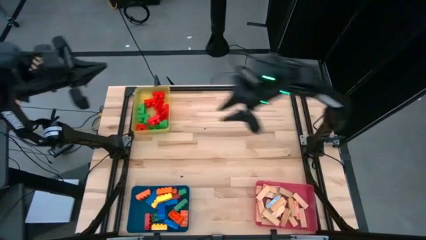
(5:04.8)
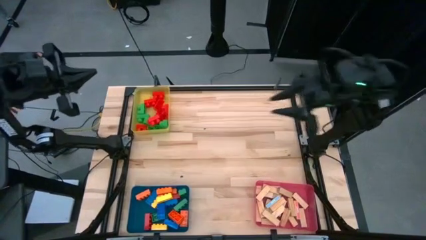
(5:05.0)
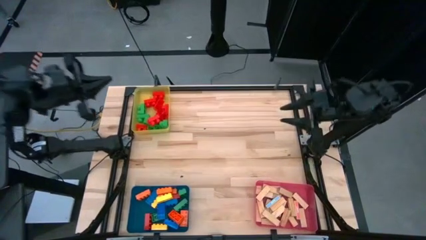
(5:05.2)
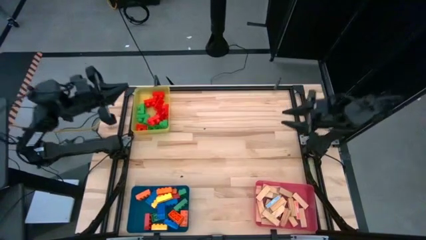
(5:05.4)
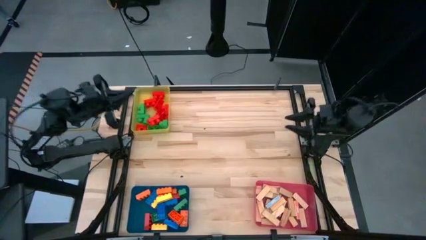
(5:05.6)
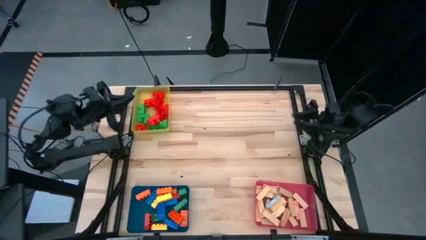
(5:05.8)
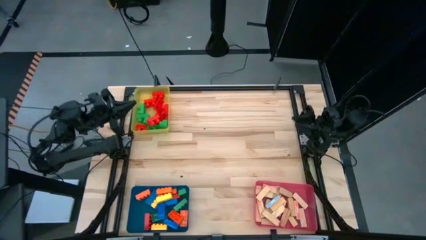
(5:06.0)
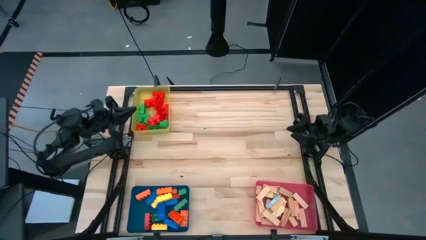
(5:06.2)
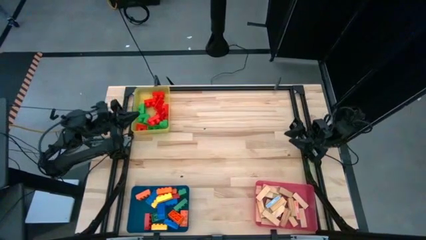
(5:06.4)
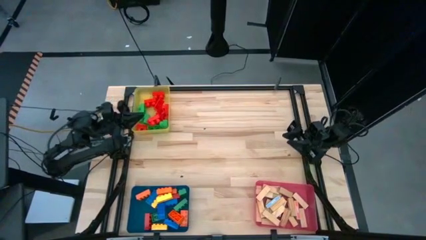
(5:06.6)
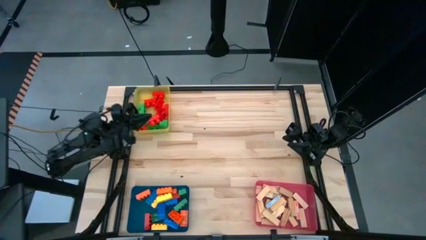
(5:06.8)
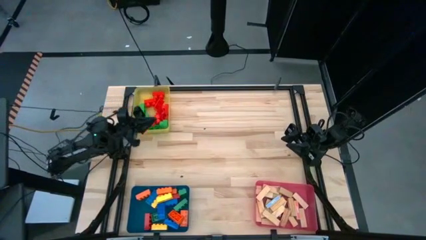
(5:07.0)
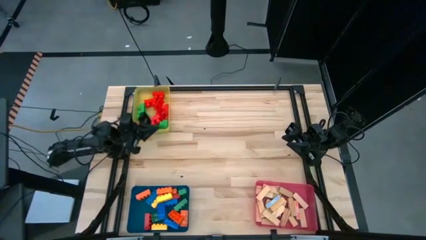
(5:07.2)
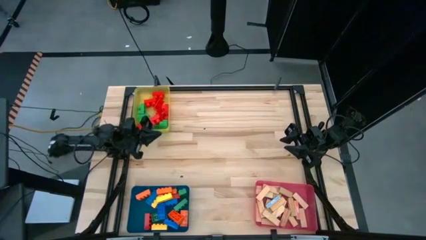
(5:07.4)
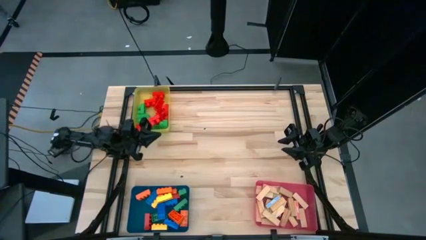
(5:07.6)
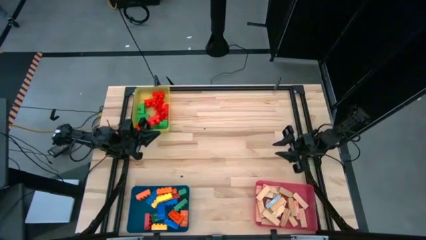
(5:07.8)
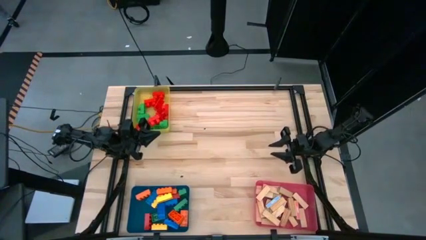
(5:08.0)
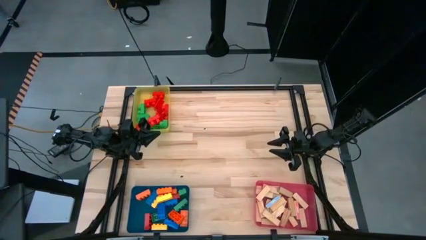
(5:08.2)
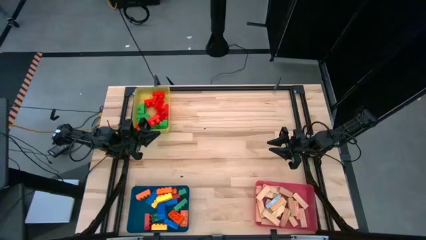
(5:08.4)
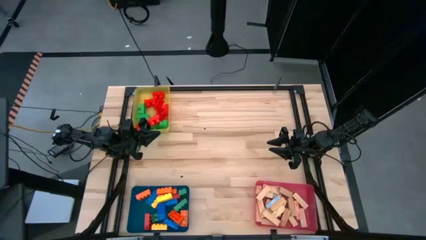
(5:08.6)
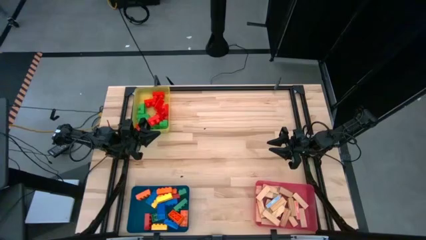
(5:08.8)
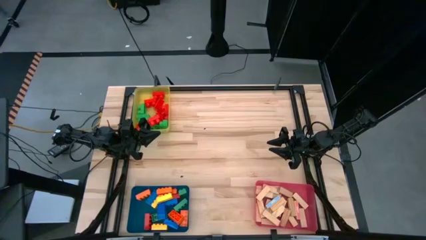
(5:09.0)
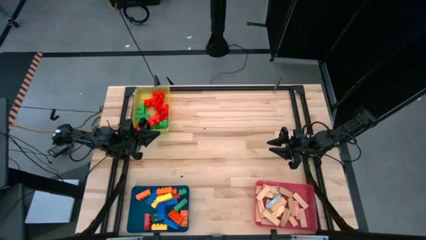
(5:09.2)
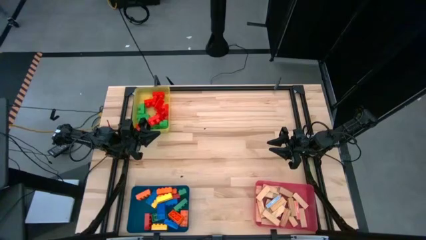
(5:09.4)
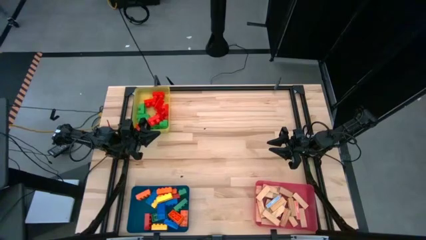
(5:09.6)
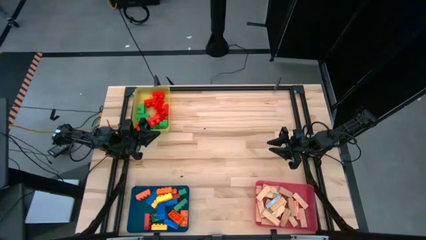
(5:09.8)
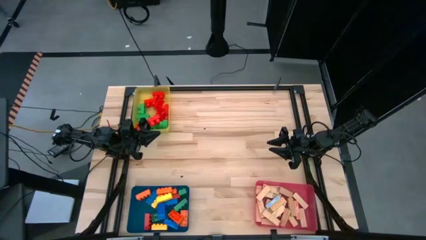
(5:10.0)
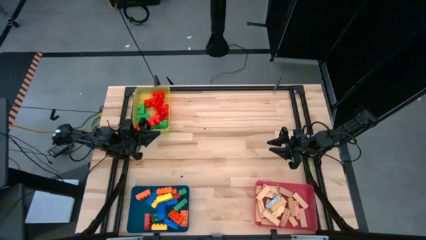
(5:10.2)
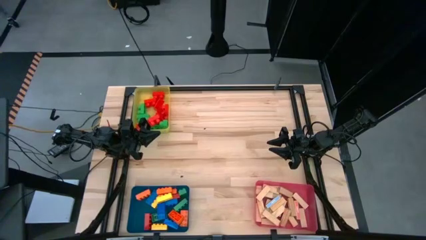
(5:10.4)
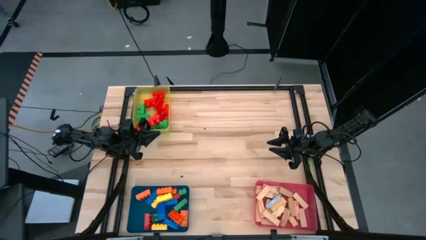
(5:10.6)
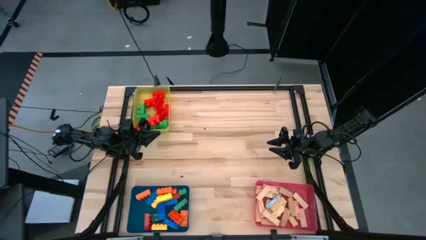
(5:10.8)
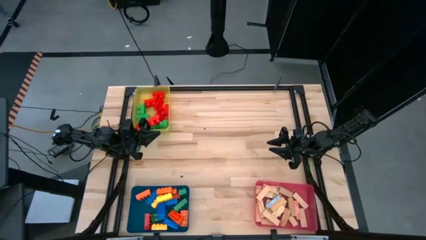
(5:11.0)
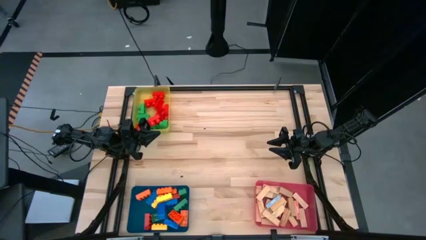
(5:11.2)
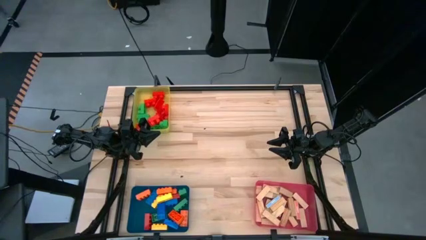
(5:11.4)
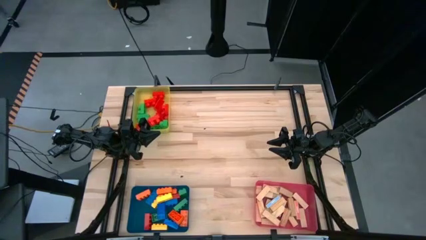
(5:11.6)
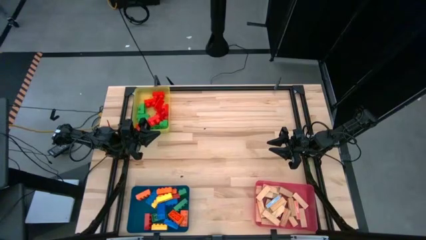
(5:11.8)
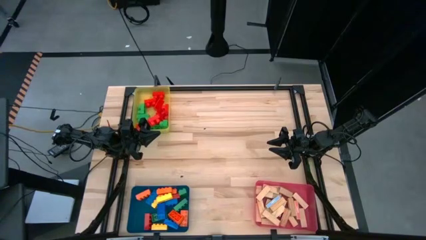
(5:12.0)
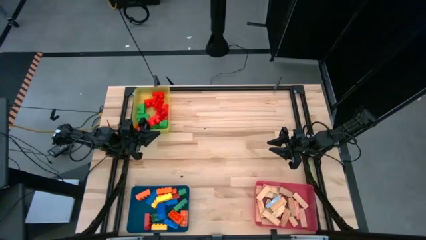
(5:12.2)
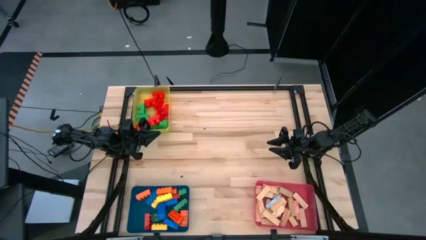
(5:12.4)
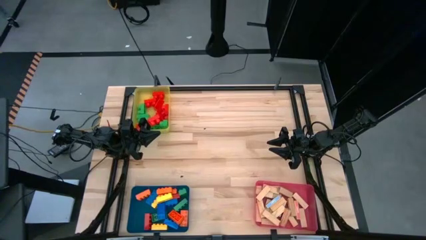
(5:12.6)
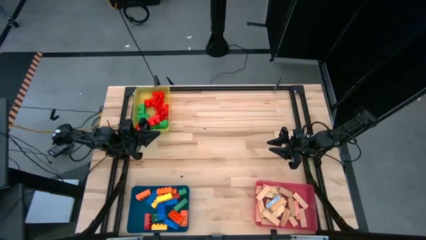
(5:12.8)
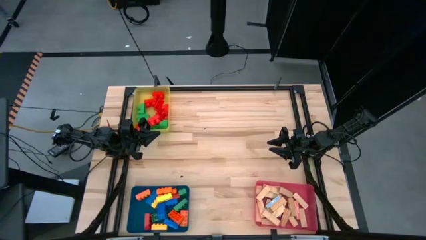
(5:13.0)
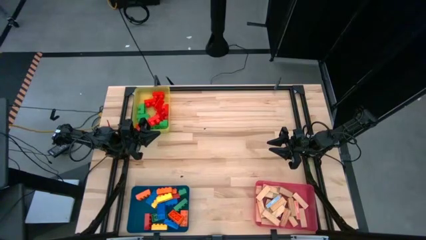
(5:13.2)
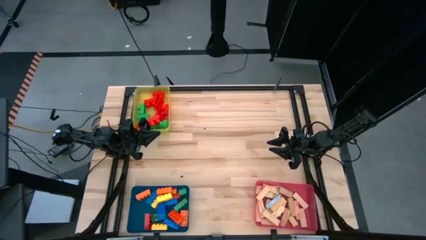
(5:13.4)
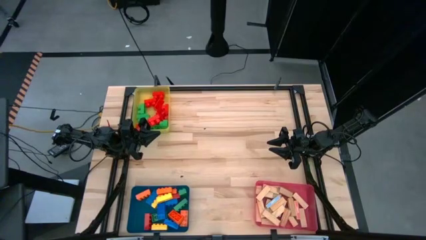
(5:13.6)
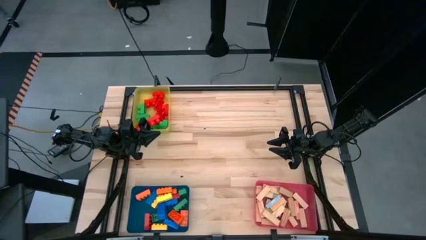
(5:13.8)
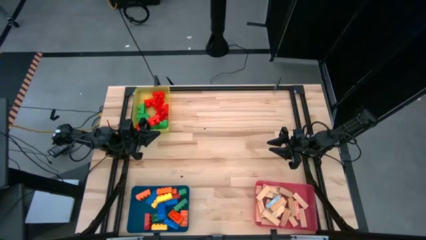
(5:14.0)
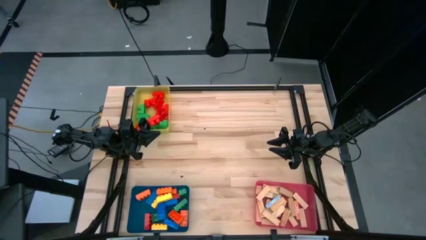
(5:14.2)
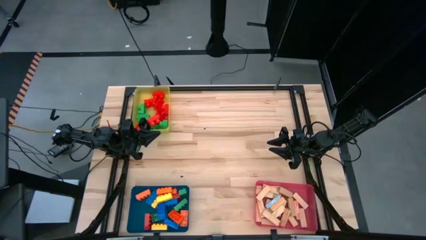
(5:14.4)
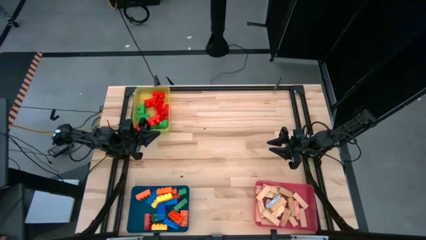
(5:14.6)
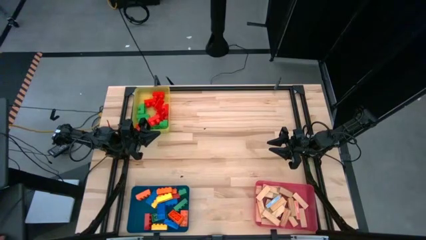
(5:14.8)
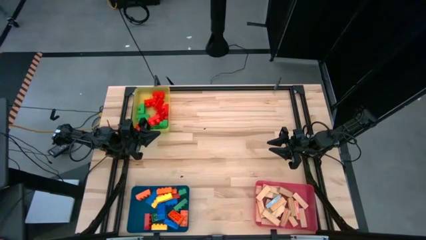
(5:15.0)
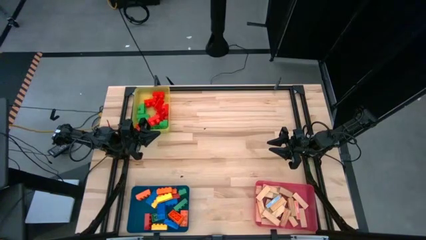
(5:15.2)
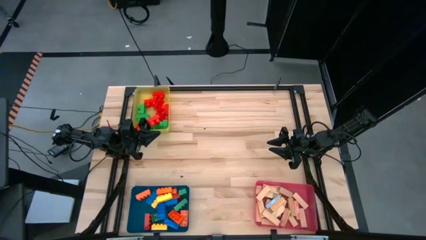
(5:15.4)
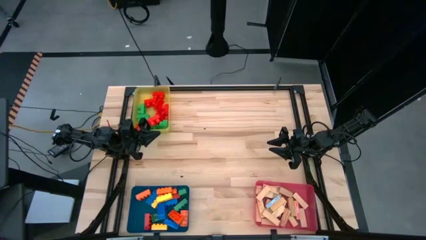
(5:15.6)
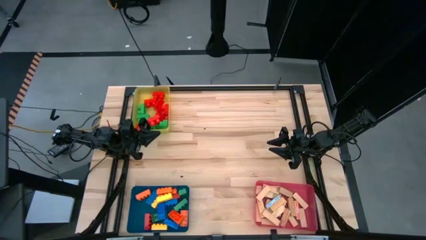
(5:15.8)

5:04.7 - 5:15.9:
Task: Sort blocks by size
Return to Home Position

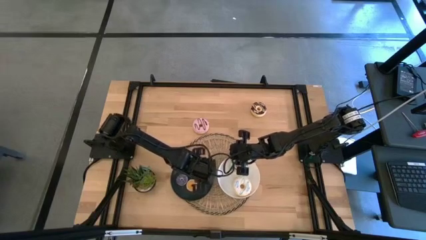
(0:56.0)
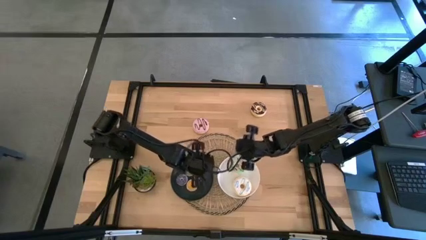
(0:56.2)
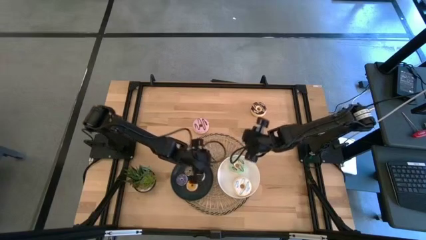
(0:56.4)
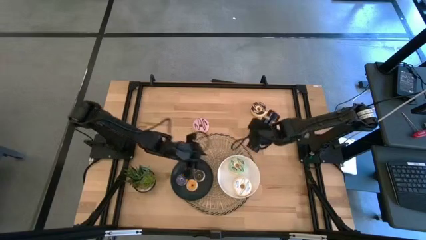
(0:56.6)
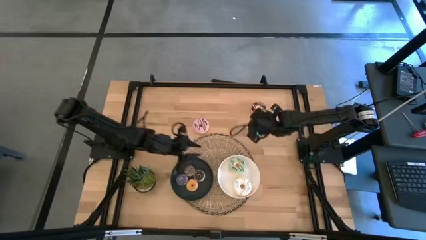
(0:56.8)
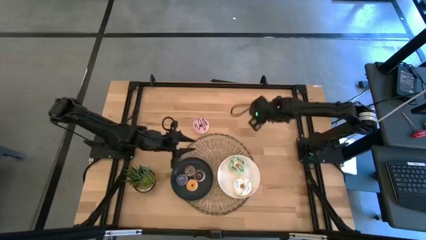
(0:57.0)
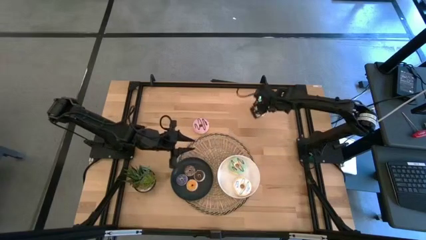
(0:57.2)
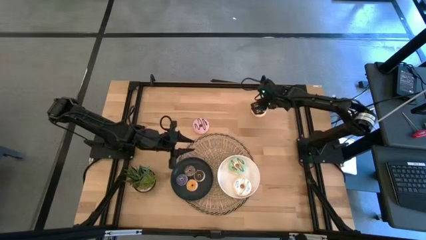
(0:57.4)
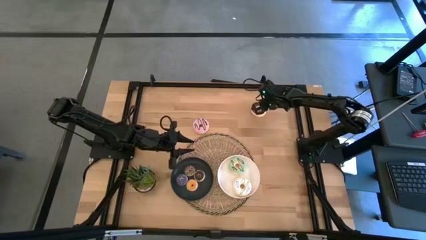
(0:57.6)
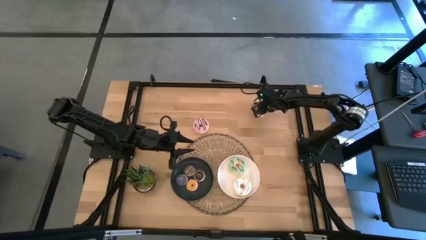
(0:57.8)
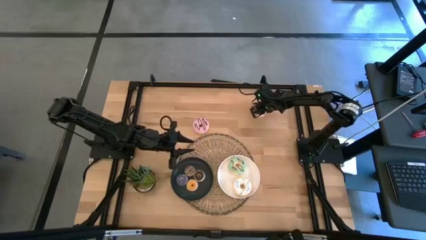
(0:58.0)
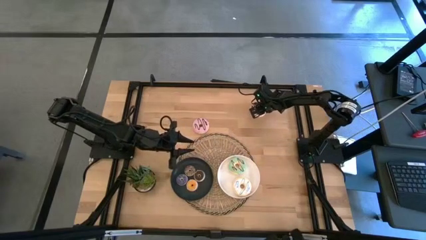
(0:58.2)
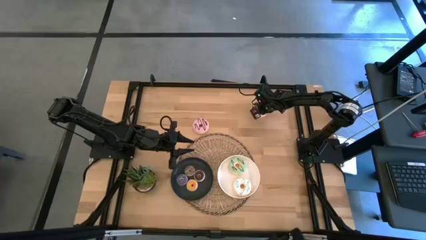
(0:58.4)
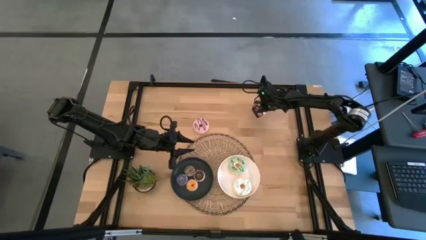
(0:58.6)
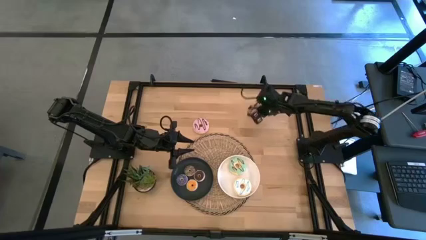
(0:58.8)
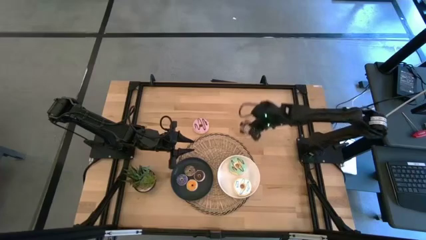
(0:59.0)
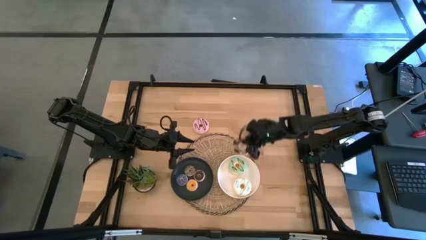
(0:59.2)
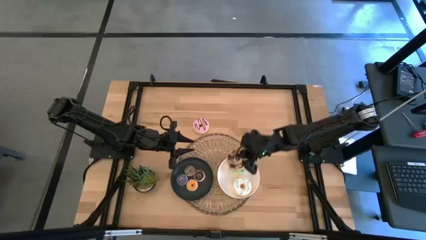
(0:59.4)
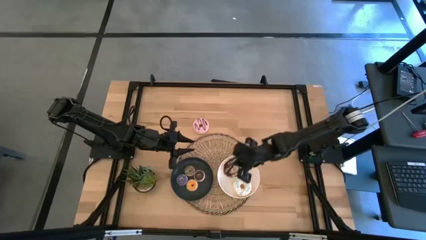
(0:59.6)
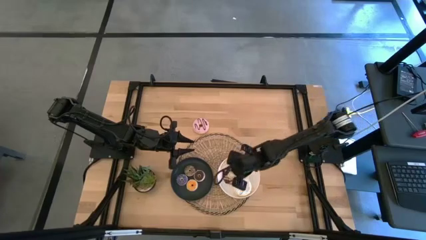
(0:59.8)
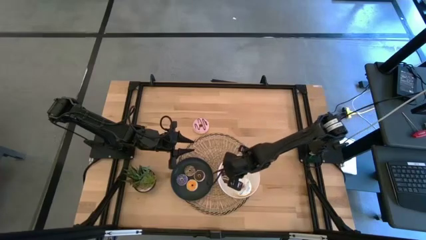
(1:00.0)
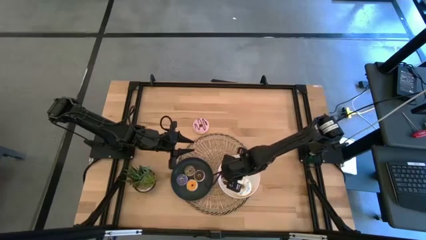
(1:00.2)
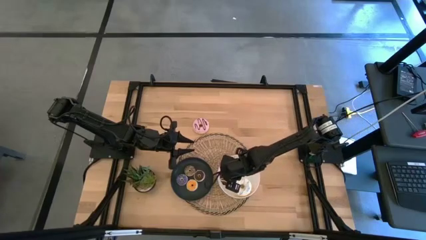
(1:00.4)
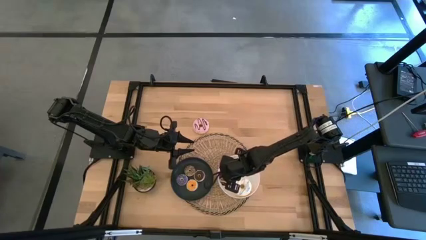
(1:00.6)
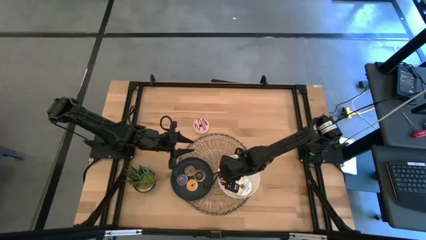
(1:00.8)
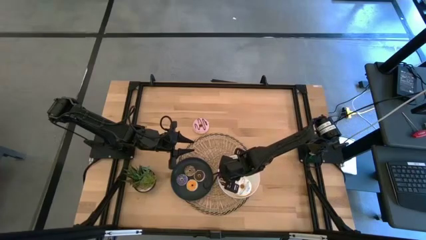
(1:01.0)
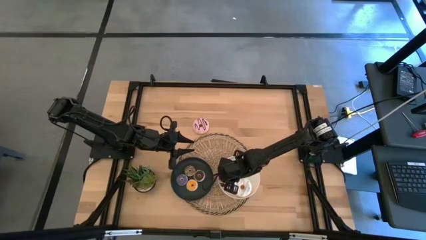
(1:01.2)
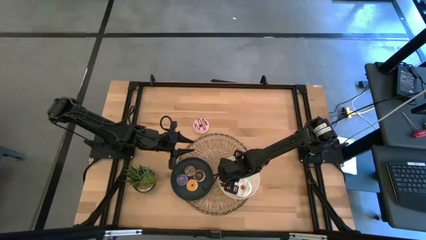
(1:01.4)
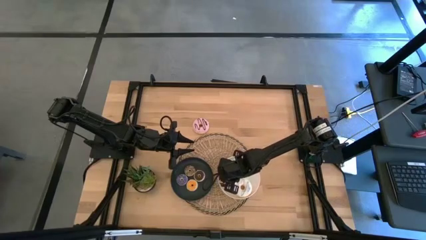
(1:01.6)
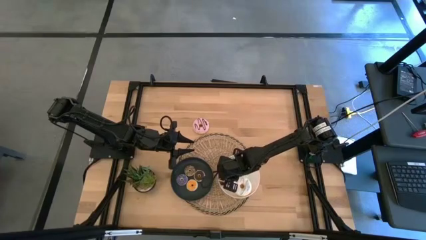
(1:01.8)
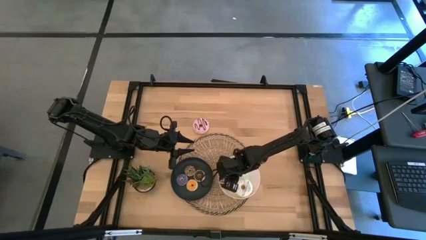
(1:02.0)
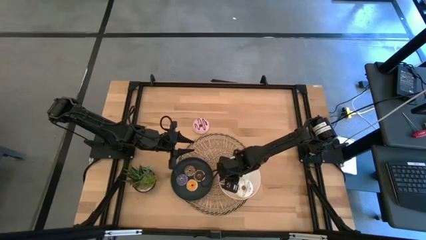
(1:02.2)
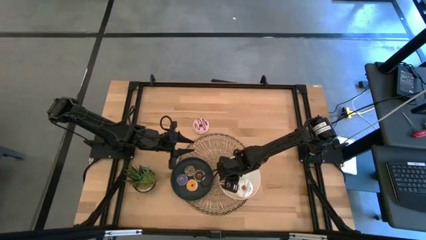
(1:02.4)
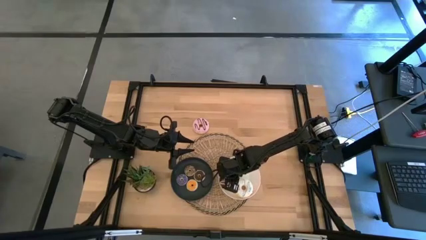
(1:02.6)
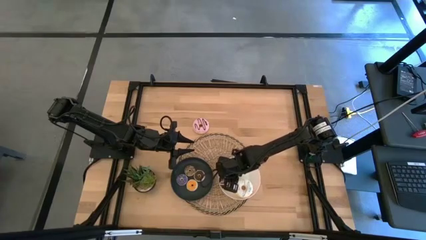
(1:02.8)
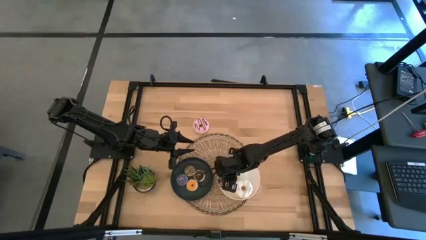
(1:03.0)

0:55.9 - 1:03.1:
Task: Pick & Place donuts
Put the large black donut on the white plate
